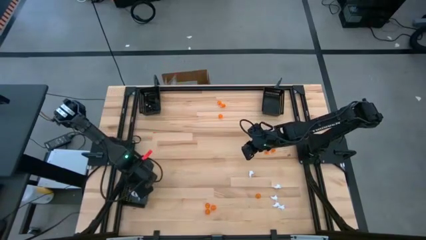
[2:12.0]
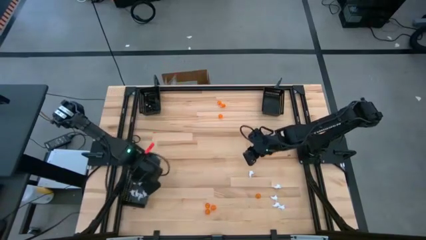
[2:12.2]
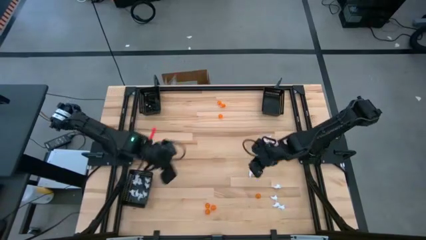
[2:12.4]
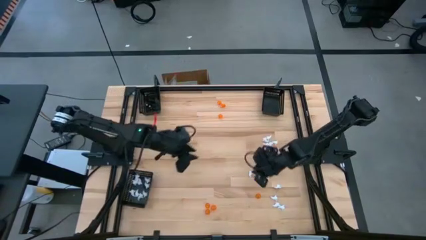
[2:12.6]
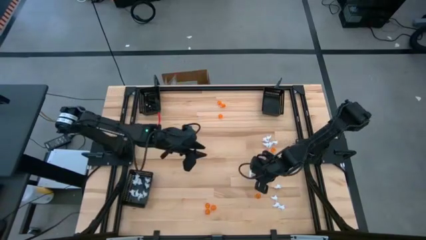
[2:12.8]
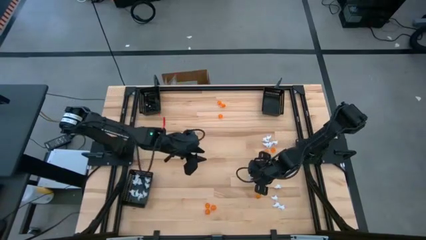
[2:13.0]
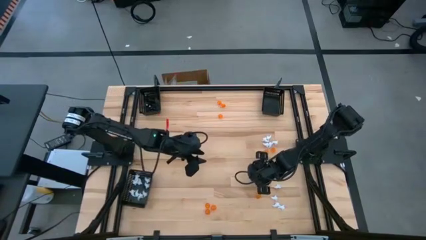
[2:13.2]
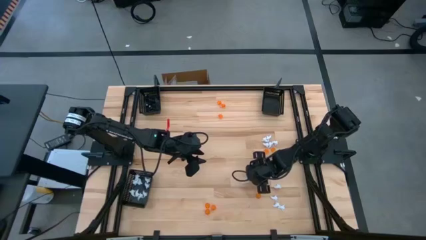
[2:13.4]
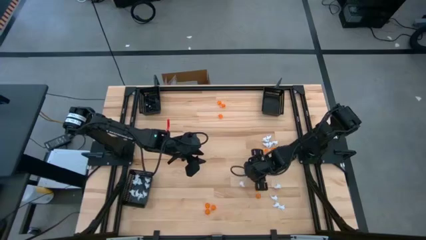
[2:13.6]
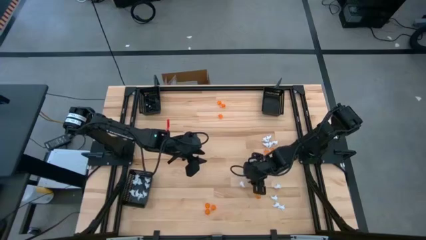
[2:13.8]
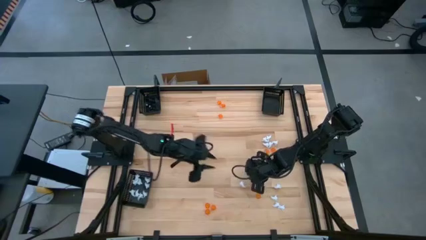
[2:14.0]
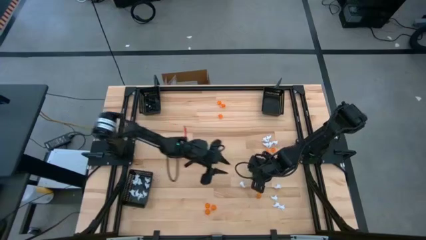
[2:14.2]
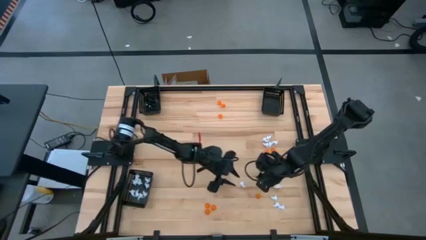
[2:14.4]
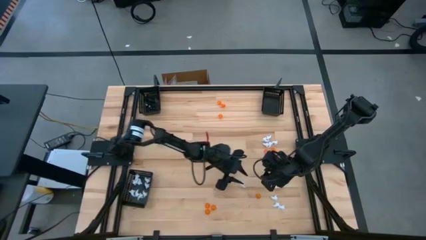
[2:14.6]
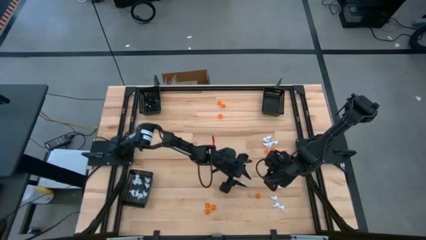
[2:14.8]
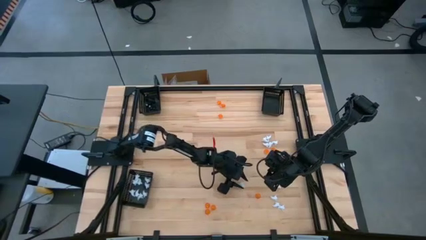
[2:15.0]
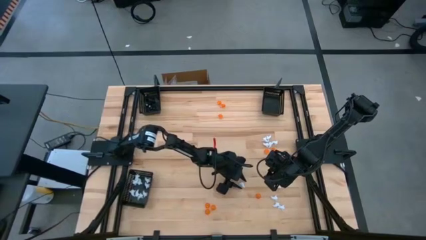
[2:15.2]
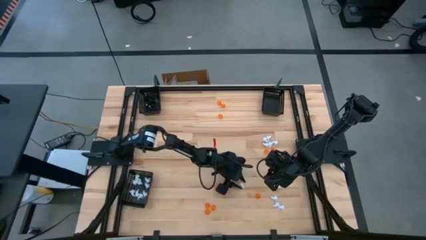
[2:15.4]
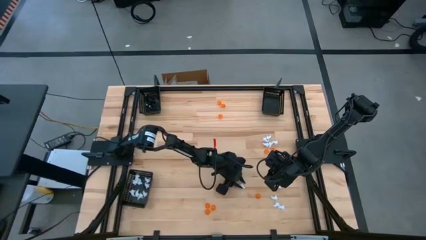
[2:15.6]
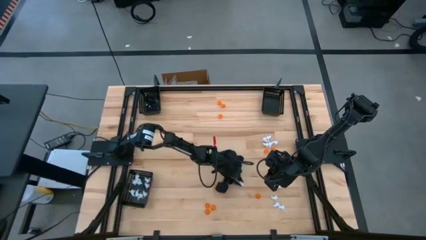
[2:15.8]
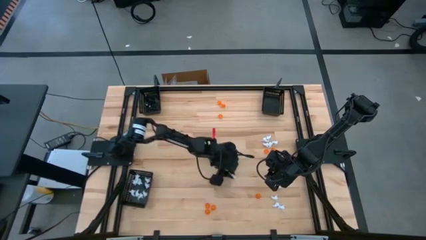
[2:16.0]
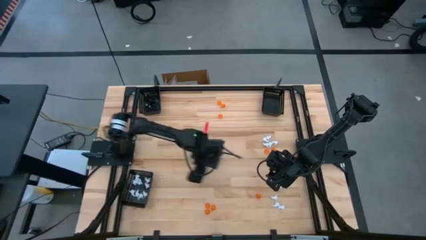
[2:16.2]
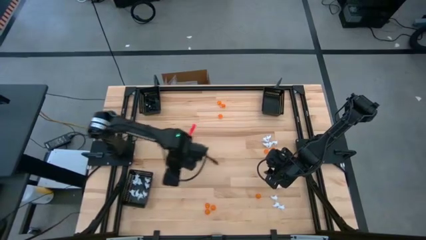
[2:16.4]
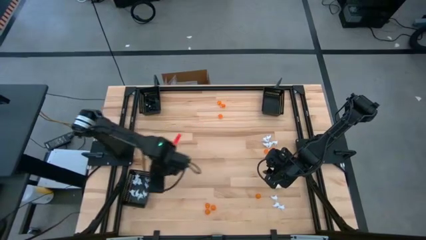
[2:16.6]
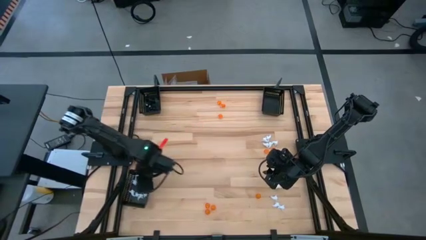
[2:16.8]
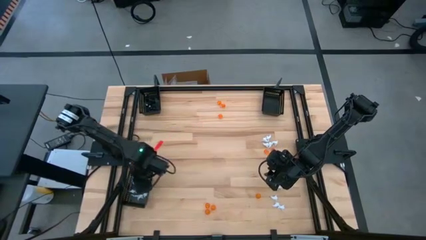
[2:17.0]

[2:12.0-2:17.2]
Task: Sort Halloween decoration
Put the white ghost toy into the bottom black basket

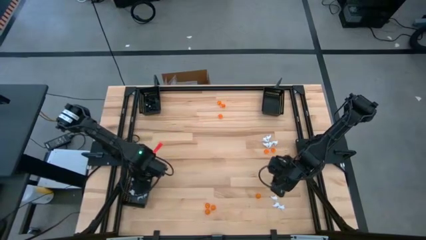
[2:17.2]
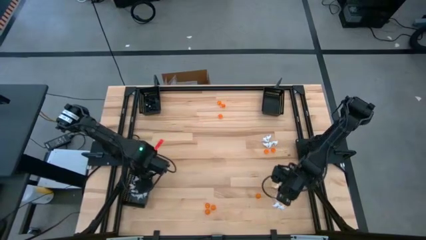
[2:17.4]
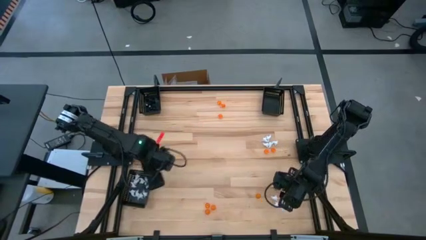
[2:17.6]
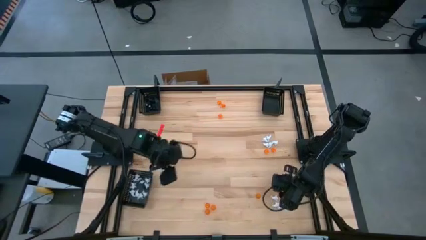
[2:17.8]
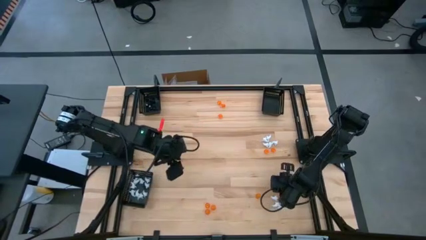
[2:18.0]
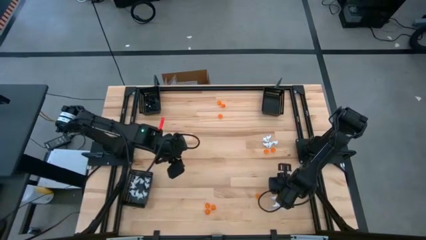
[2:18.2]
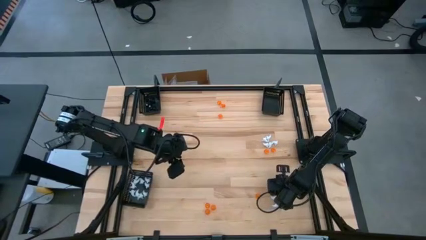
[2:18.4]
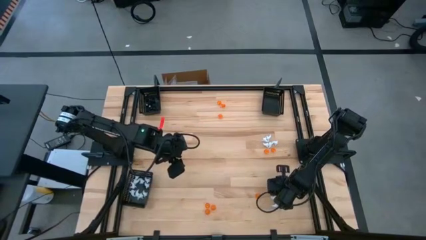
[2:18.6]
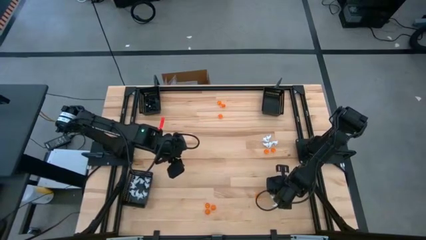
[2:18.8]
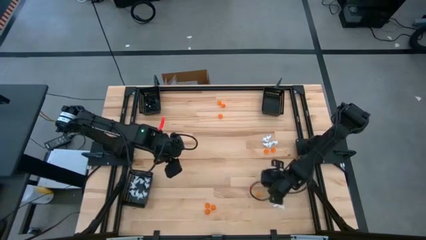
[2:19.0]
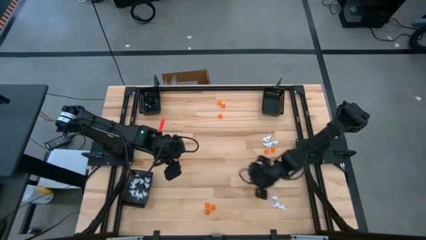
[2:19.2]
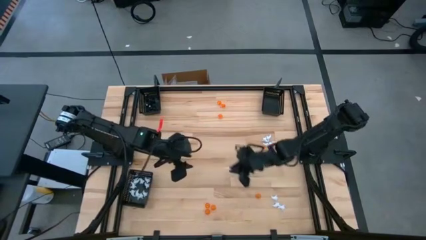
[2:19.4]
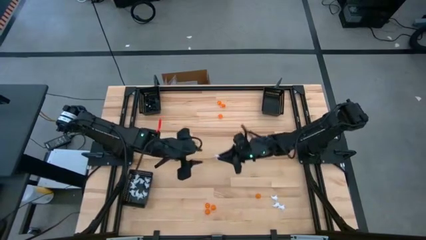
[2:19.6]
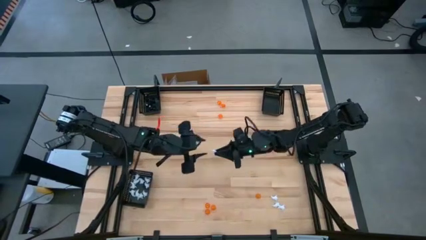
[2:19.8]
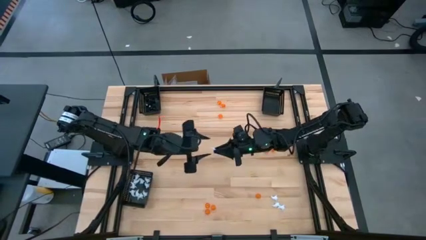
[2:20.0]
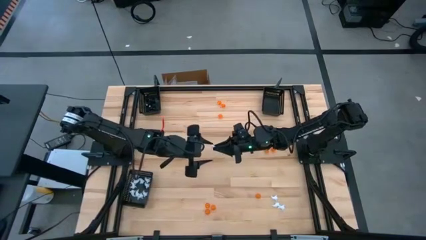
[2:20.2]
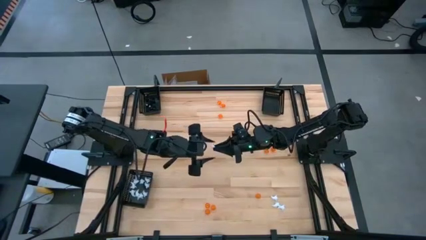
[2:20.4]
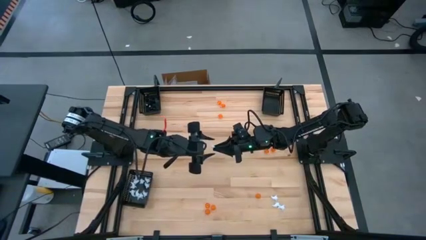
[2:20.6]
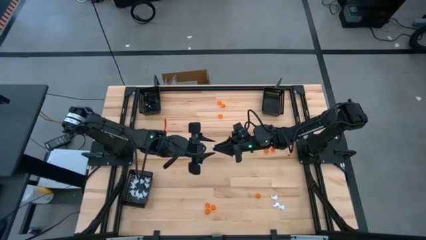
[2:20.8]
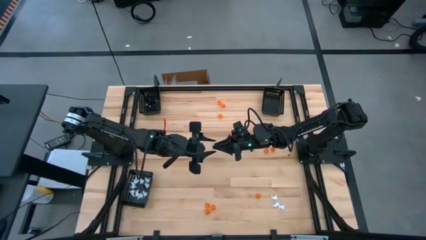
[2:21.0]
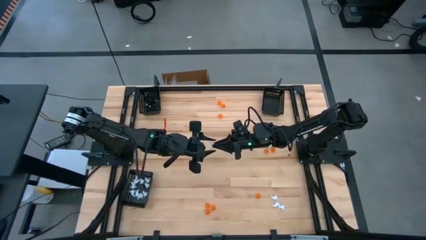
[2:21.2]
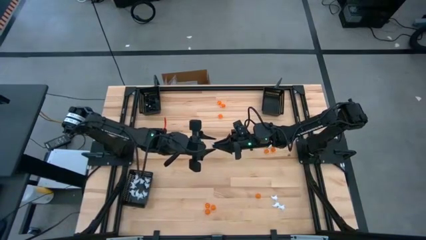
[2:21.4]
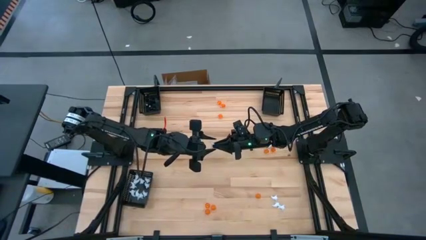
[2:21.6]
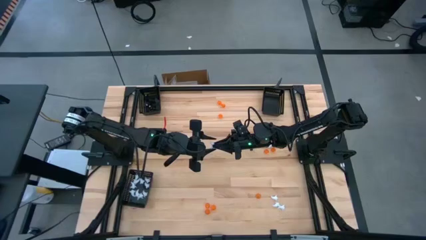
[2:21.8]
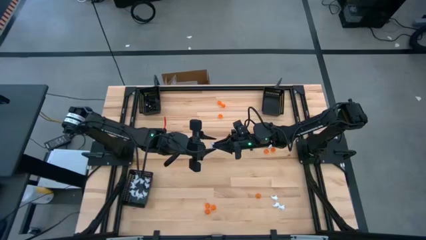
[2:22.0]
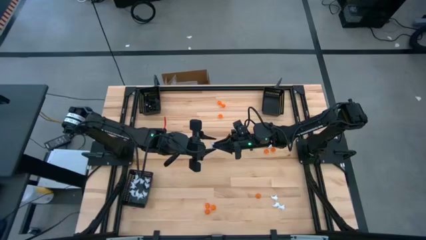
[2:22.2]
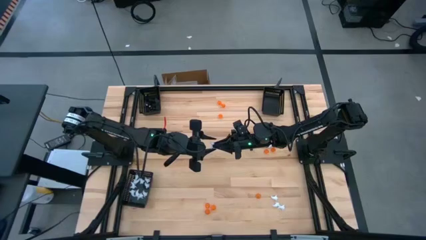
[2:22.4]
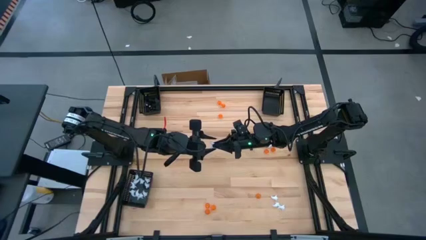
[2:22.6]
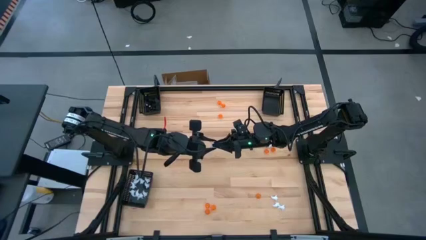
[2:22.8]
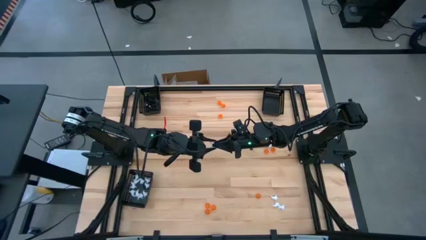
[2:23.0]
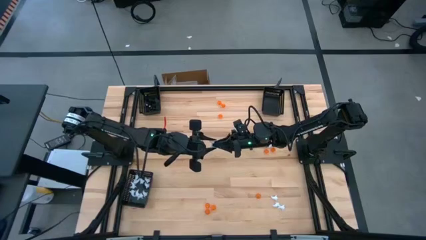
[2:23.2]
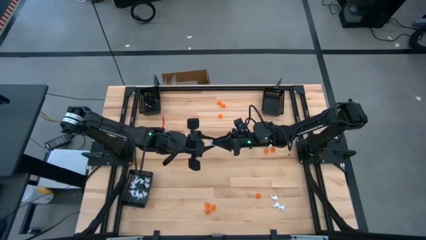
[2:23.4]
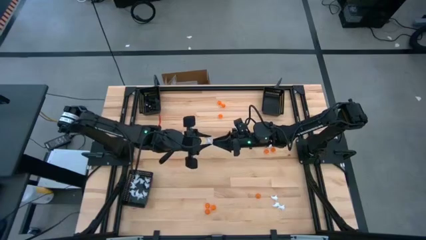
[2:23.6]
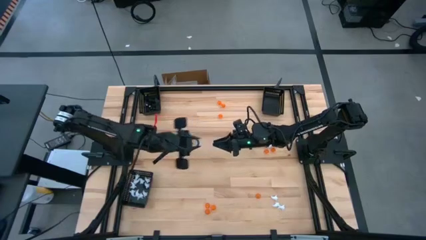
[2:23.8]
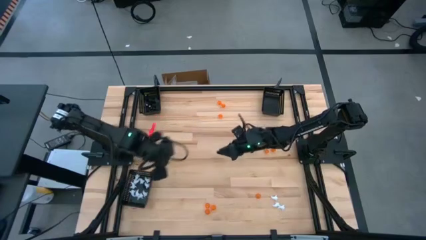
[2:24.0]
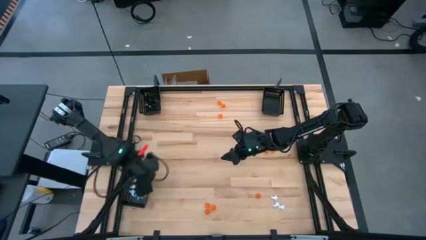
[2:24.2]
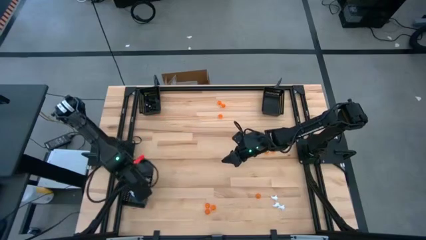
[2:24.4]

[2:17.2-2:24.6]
Put the white ghost toy into the bottom black basket

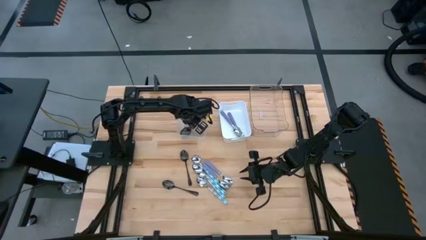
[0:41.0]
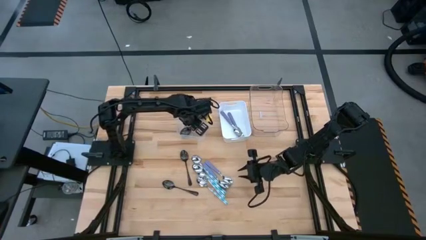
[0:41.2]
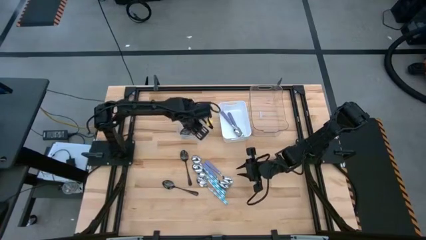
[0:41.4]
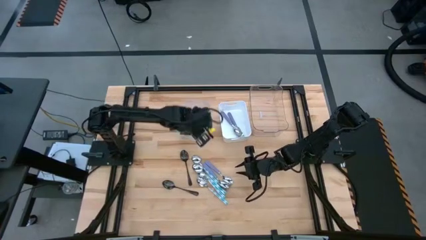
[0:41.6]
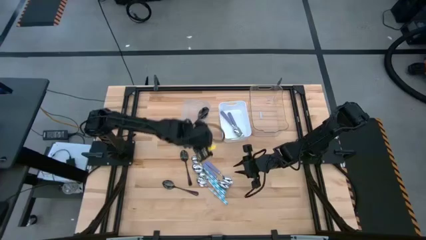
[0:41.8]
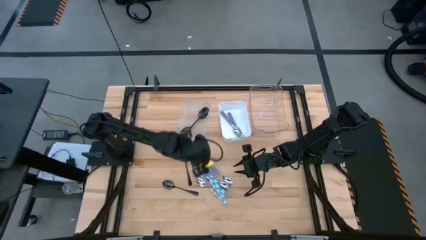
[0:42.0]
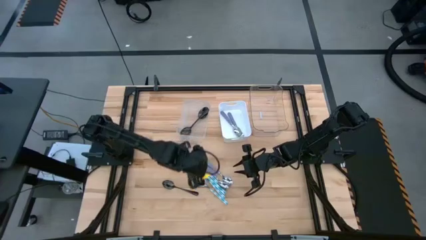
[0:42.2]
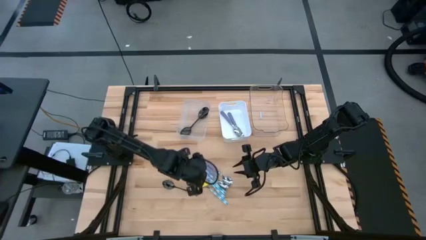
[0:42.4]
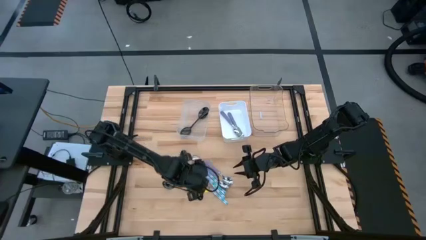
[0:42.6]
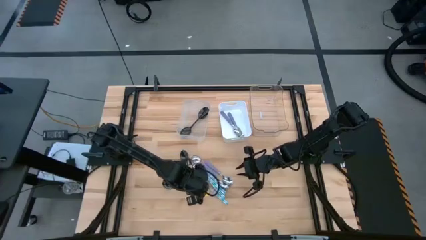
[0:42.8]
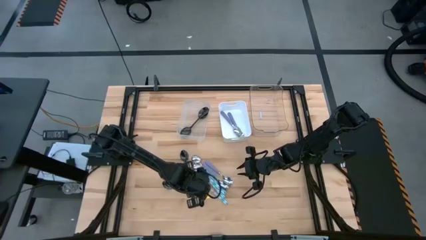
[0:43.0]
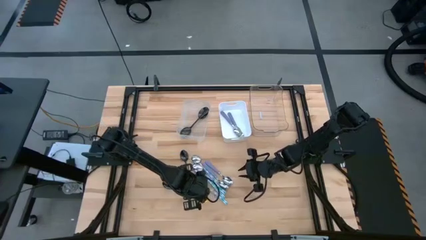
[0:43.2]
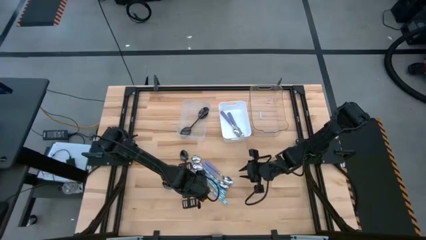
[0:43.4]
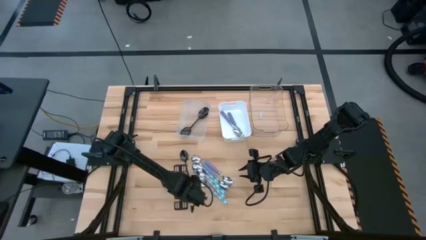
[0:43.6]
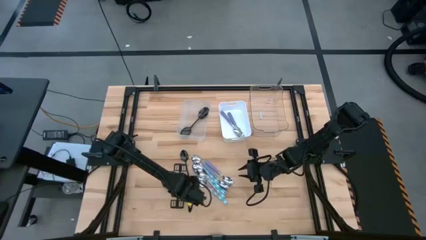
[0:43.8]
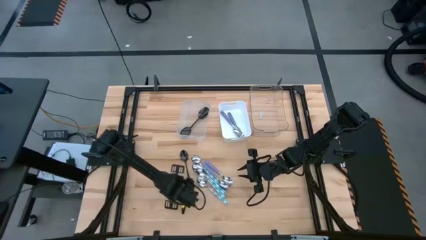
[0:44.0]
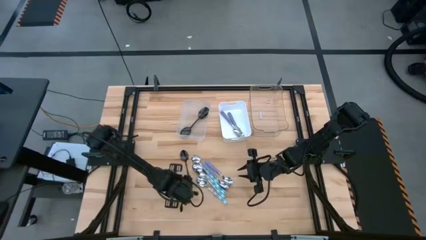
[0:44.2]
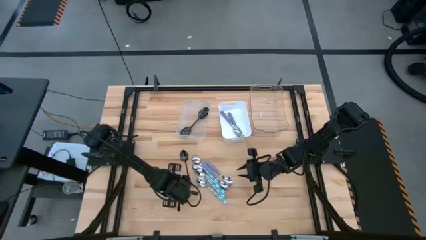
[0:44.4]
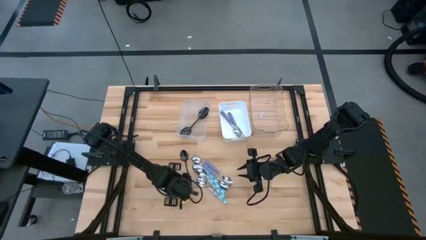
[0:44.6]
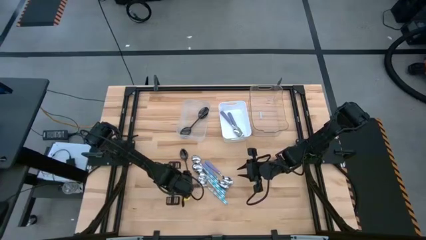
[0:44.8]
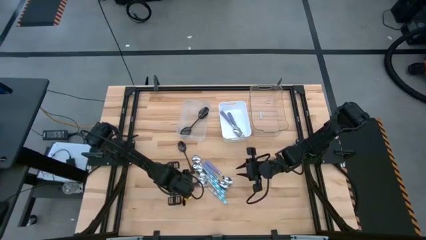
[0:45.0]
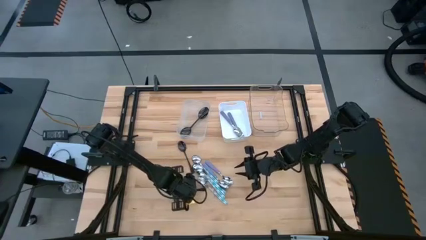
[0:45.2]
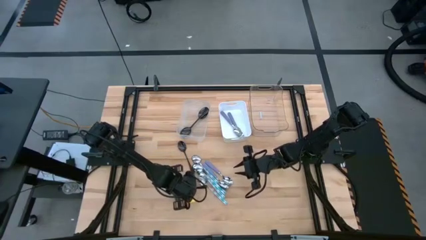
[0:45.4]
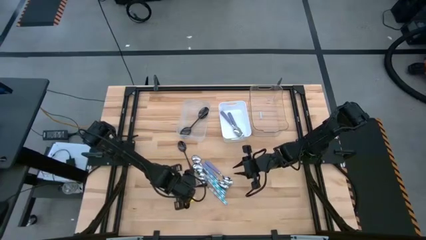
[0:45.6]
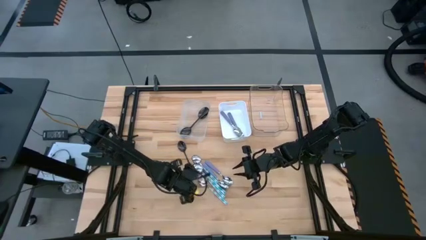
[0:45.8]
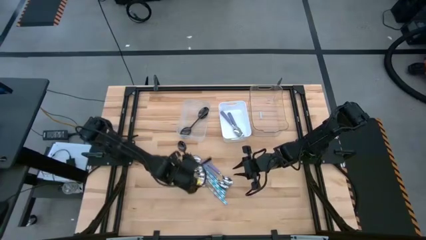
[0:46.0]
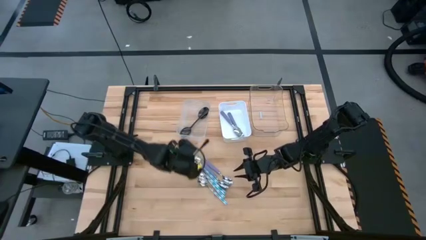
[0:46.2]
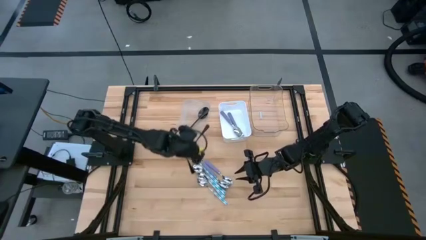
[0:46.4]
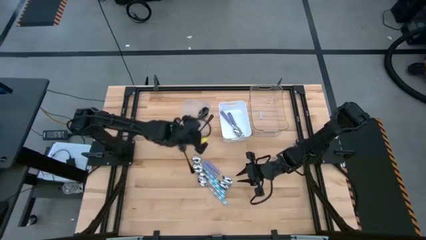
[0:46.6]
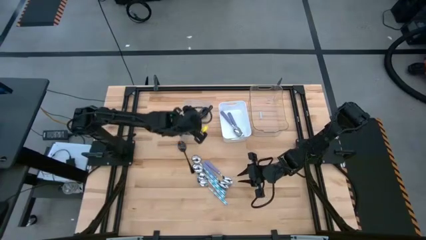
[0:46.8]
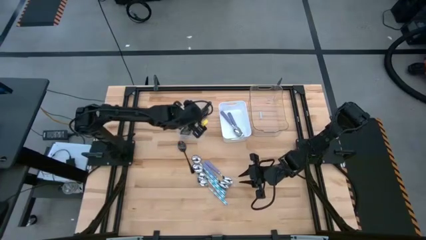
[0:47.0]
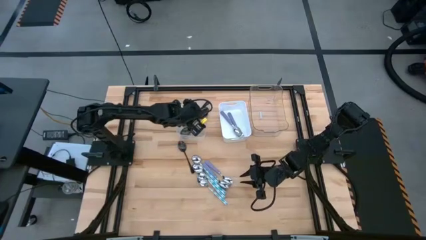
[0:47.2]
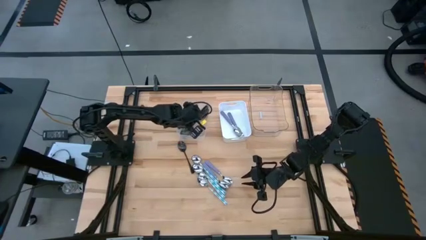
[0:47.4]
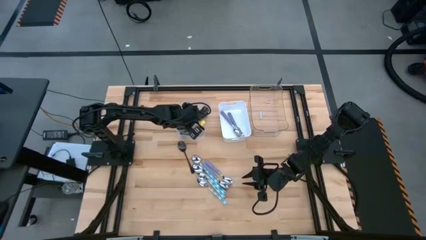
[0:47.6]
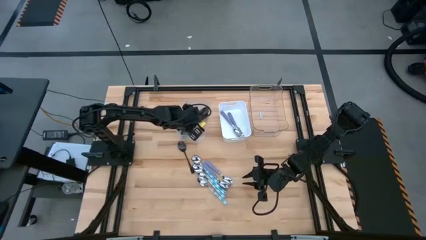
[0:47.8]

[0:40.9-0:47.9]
Task: Sort silverware by color (type)
Put the black spoon into the left transparent bin
